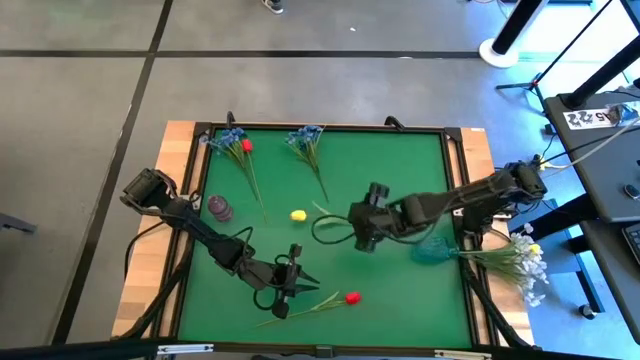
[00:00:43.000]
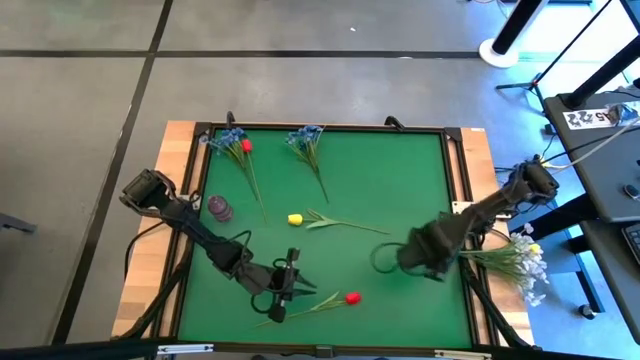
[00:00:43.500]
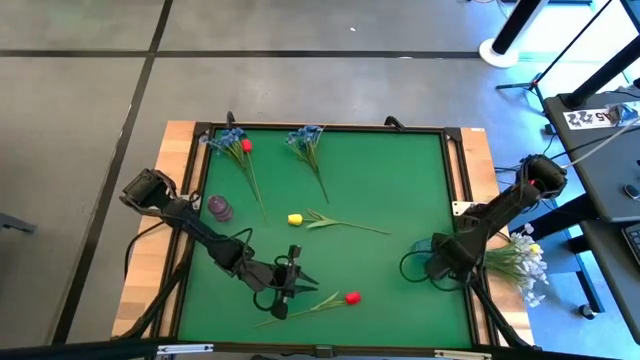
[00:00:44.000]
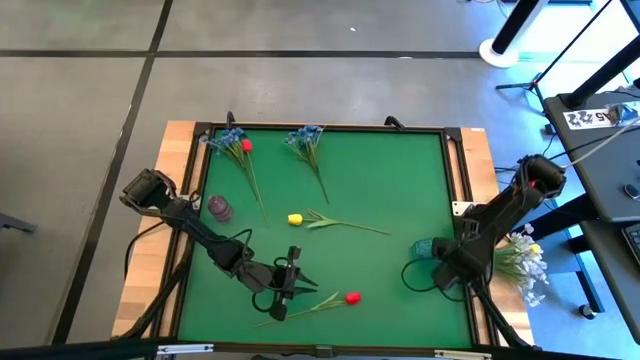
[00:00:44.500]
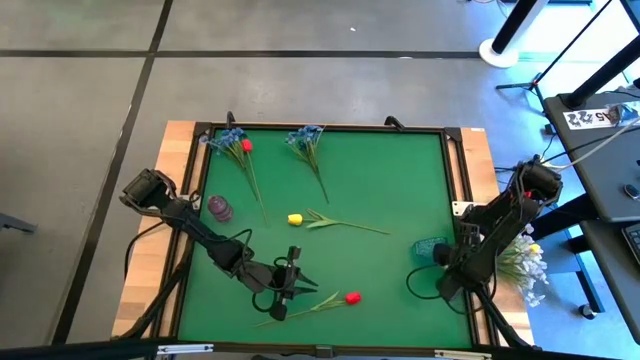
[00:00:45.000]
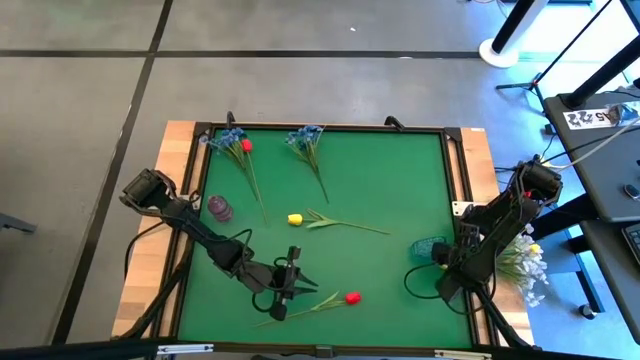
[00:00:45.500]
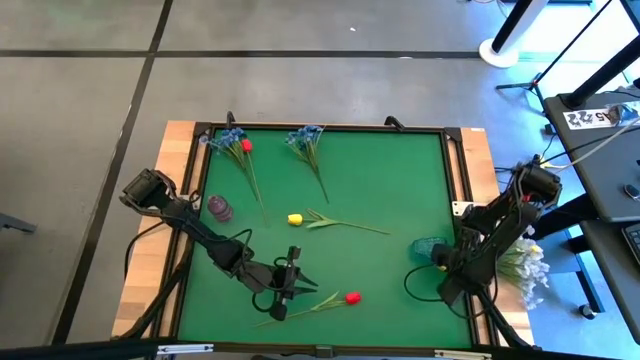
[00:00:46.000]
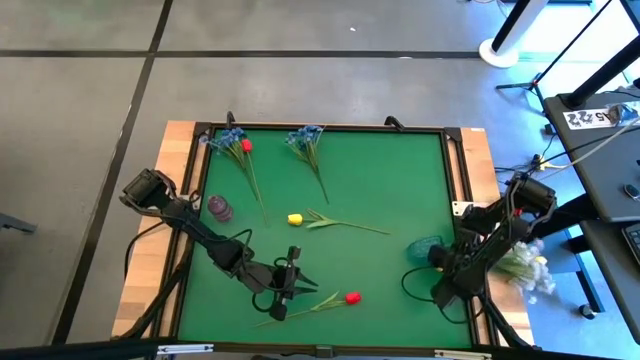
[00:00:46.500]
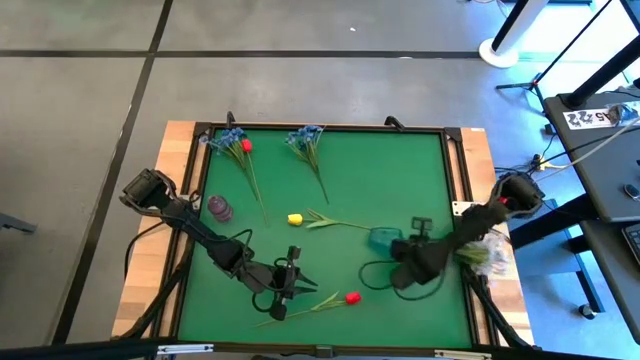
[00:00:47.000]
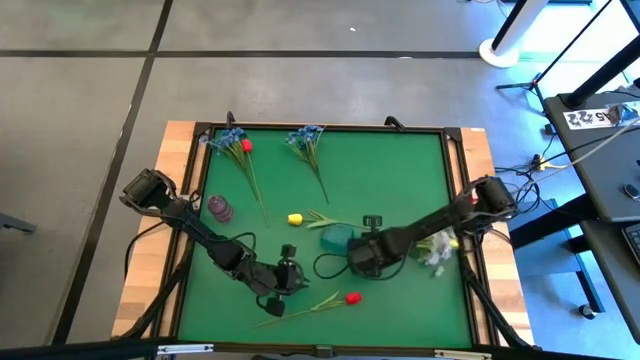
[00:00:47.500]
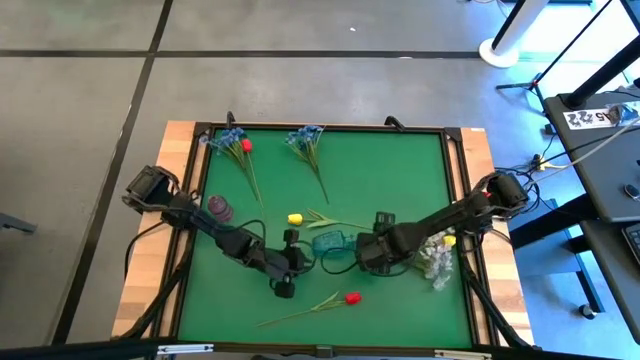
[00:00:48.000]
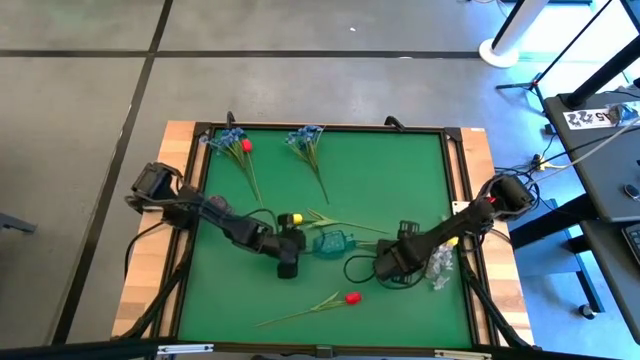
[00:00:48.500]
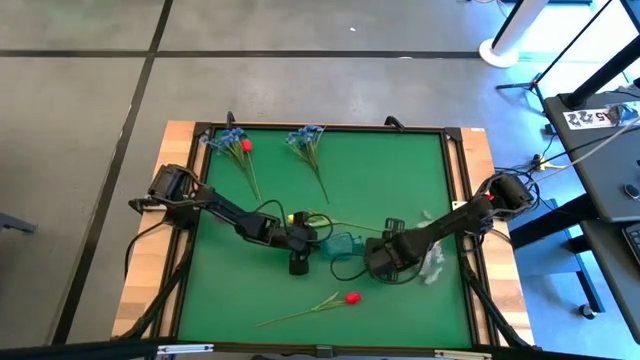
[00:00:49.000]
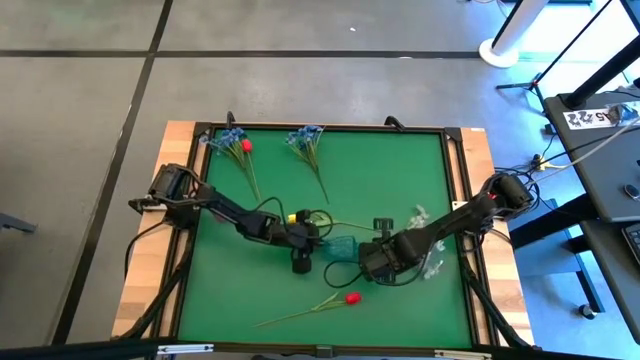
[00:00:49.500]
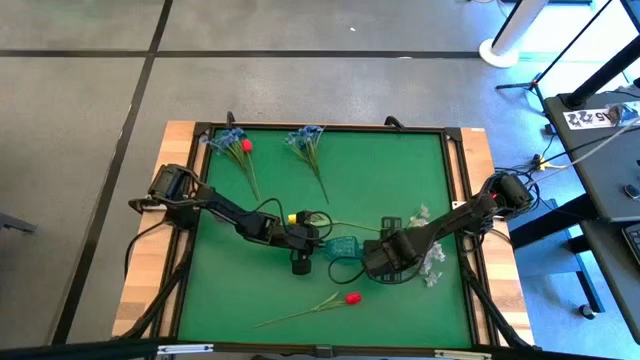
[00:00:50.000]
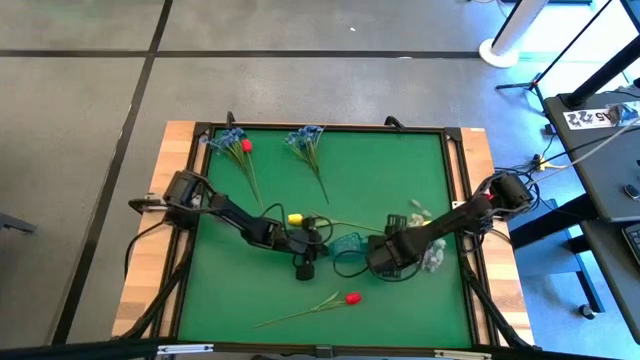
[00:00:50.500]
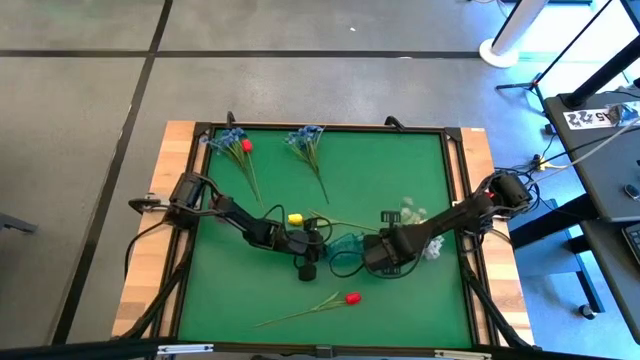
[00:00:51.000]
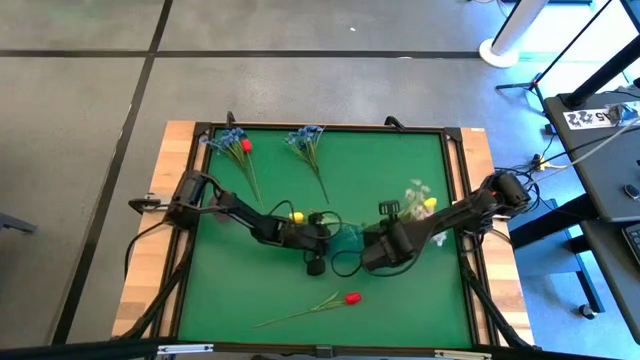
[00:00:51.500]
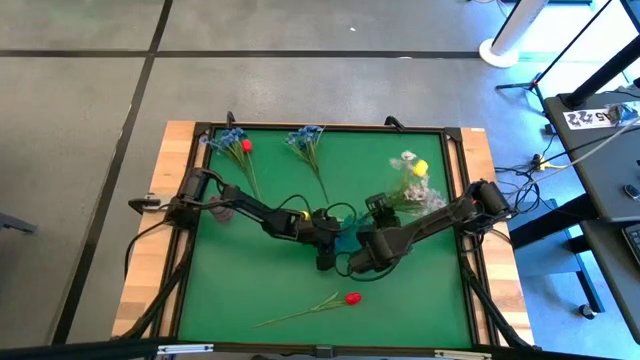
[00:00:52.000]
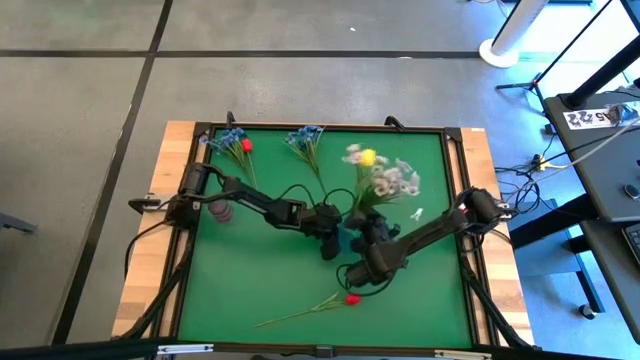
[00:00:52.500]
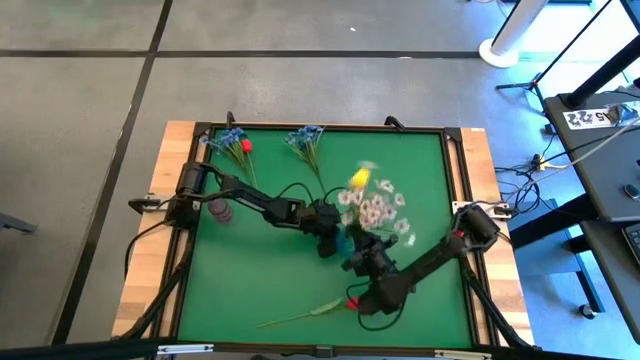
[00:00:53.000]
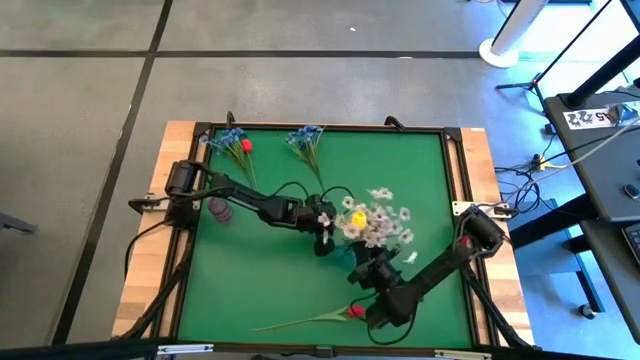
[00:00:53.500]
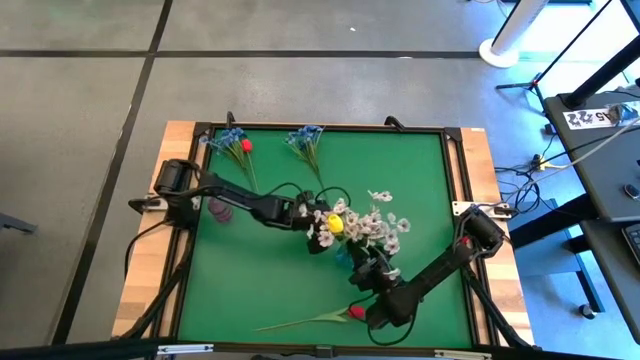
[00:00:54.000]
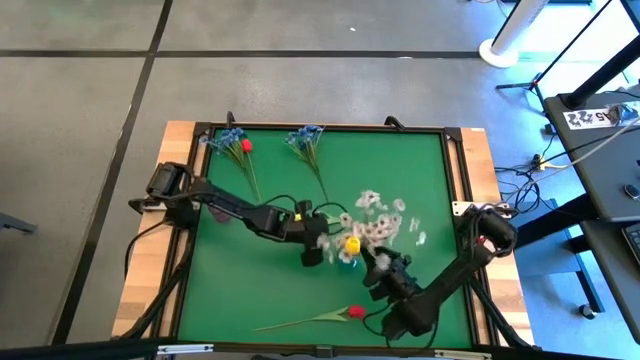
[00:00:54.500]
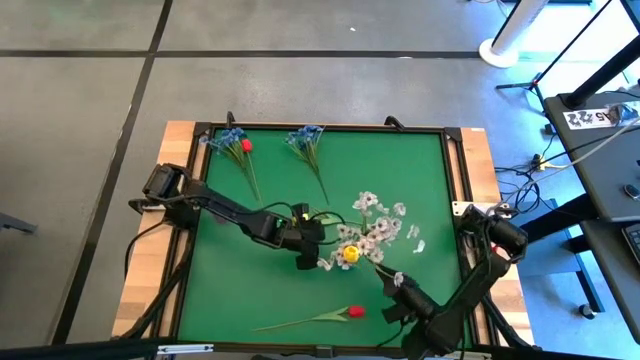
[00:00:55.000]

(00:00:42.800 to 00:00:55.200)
Task: Sort flowers into vase by color
Adjust the blue vase

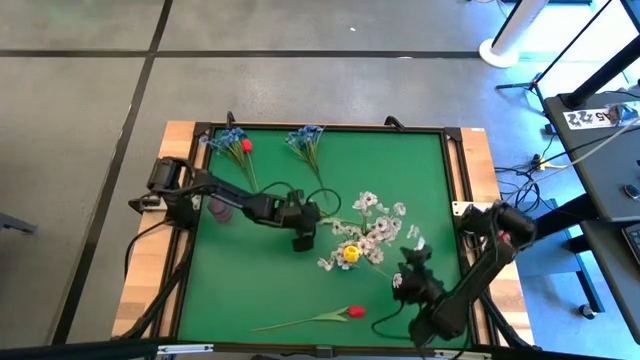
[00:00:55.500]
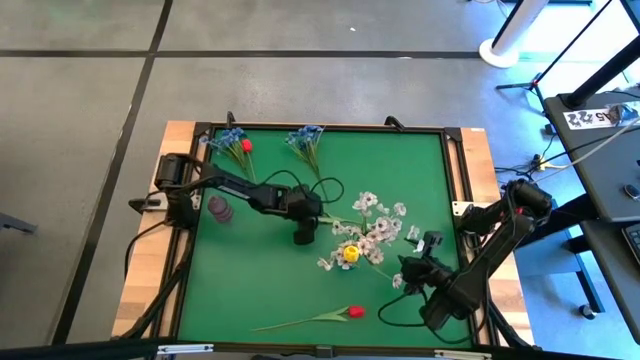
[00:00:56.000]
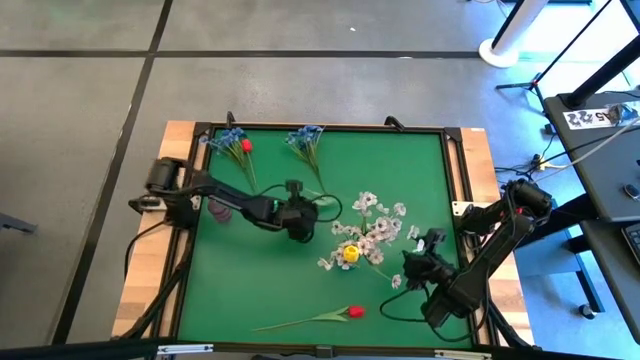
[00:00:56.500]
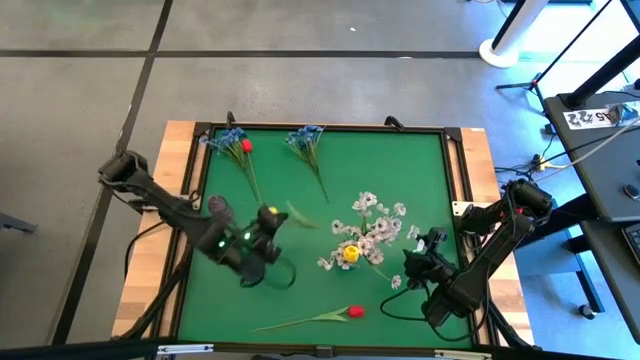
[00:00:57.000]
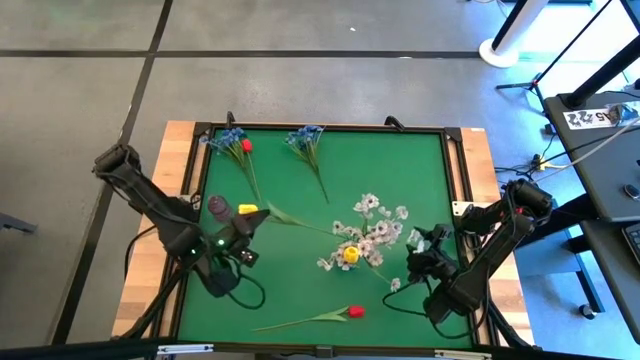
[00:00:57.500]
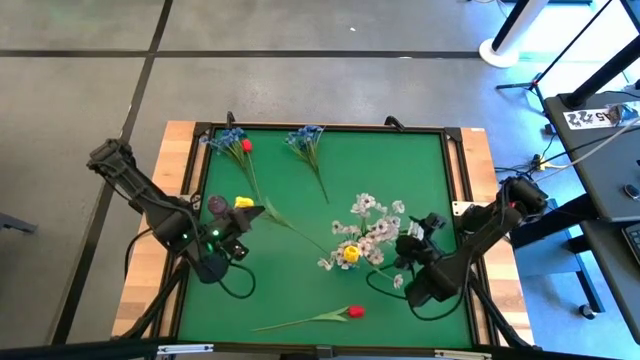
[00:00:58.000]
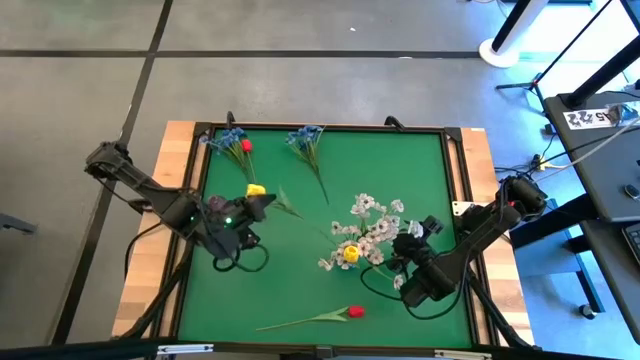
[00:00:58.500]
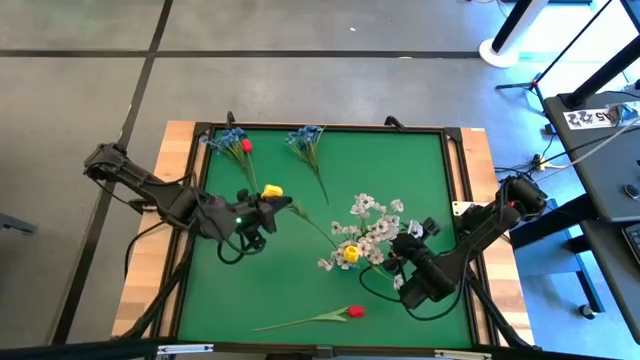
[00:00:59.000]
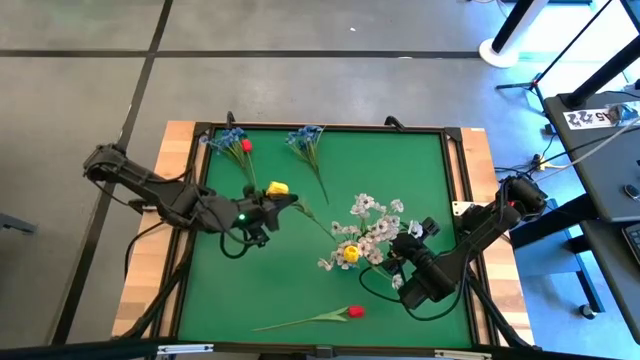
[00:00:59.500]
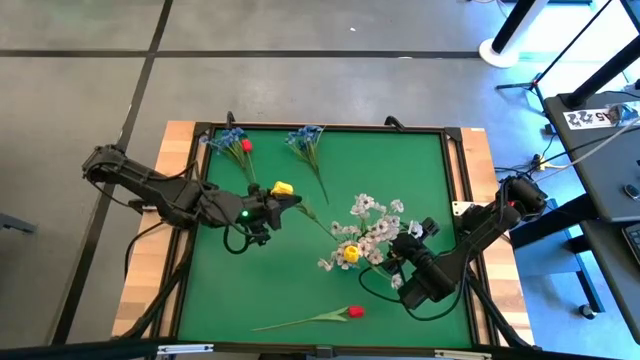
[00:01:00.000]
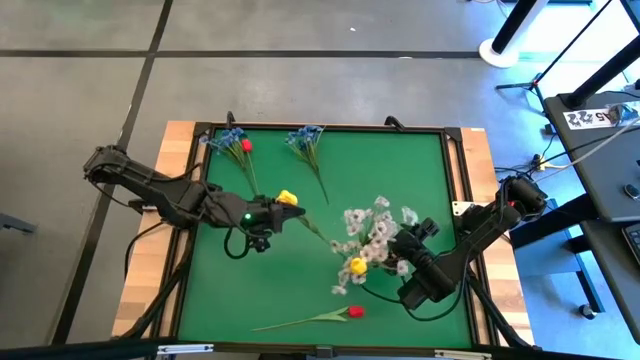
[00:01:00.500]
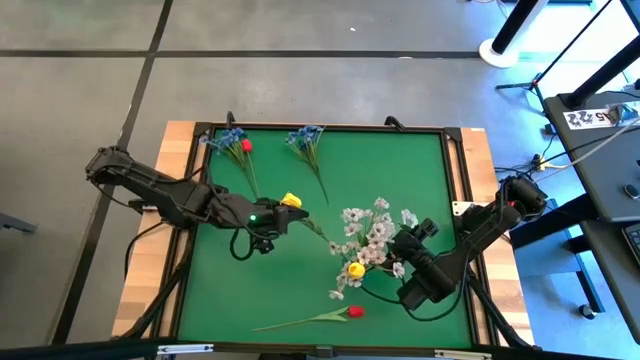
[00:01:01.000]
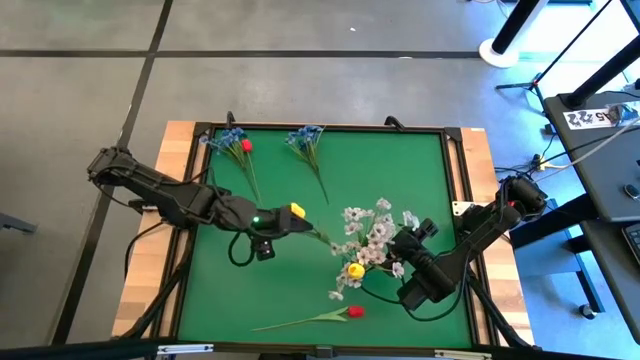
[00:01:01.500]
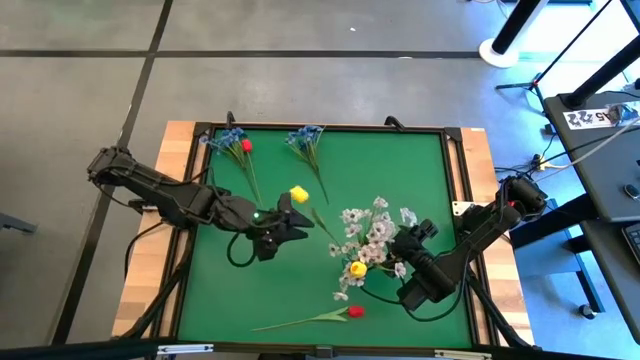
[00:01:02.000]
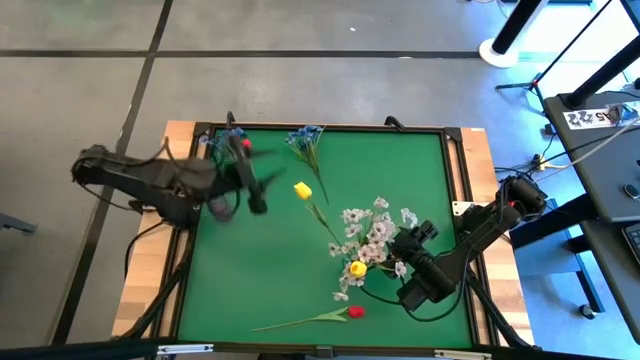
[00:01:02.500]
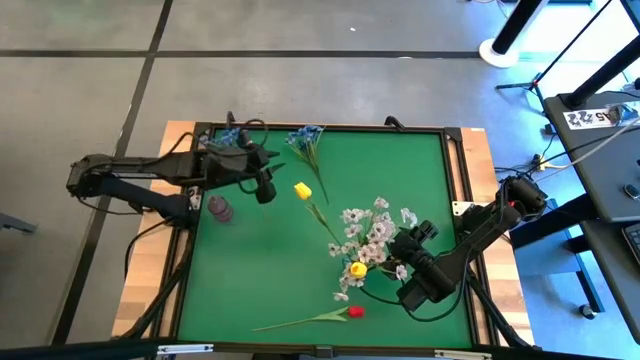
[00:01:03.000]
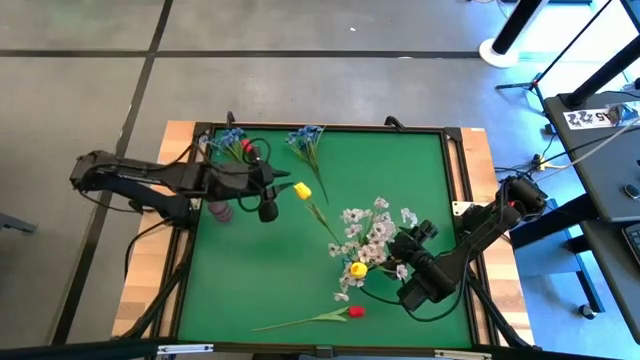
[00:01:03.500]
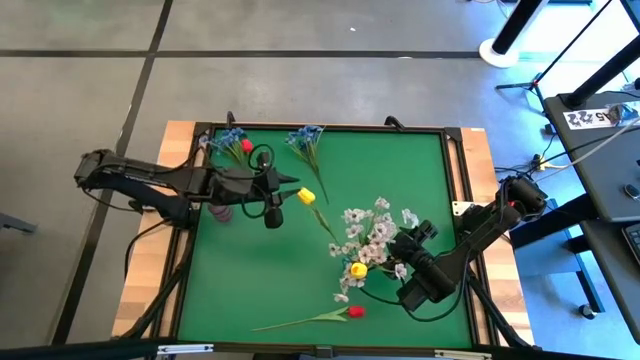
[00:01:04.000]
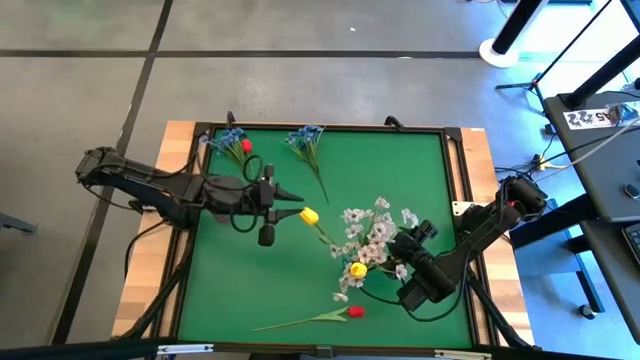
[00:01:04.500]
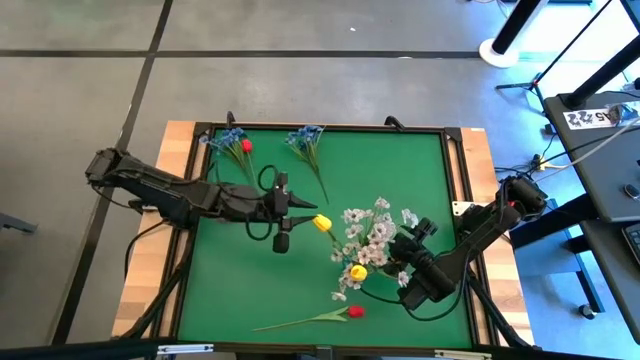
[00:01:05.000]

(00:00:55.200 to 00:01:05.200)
Put the yellow flower into the blue vase
